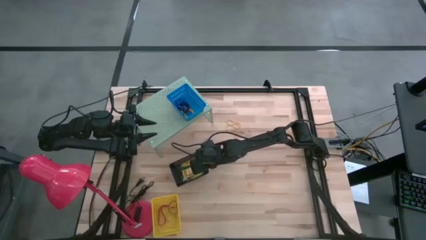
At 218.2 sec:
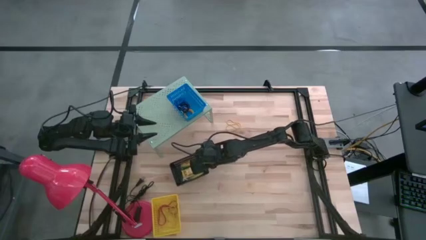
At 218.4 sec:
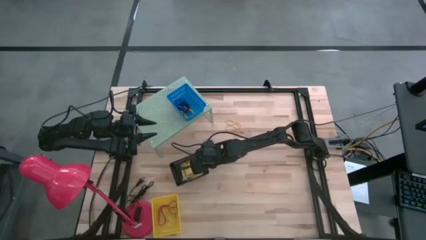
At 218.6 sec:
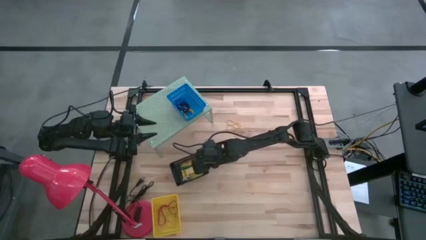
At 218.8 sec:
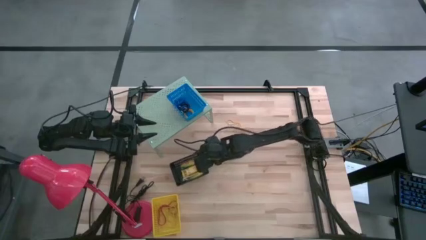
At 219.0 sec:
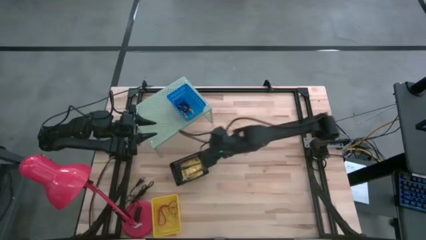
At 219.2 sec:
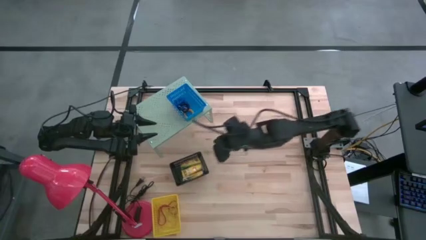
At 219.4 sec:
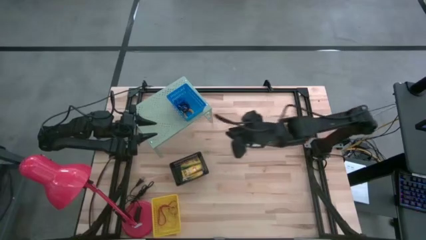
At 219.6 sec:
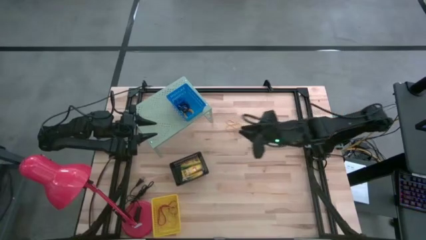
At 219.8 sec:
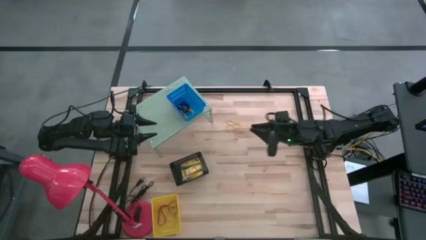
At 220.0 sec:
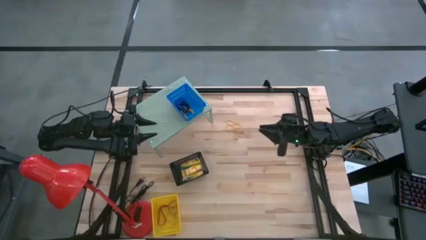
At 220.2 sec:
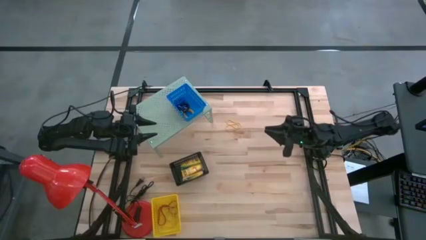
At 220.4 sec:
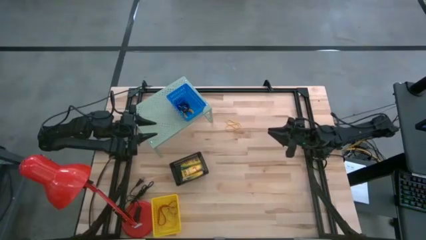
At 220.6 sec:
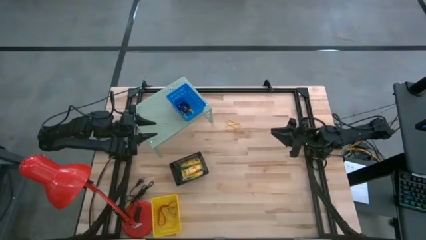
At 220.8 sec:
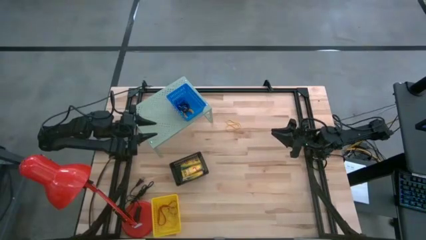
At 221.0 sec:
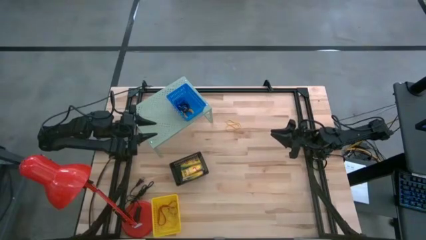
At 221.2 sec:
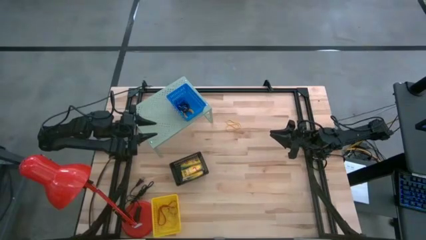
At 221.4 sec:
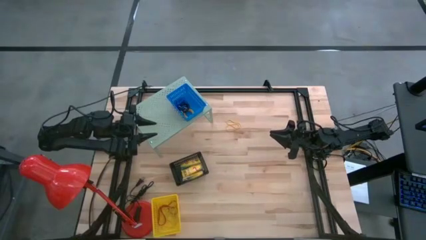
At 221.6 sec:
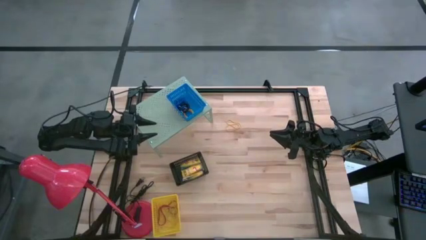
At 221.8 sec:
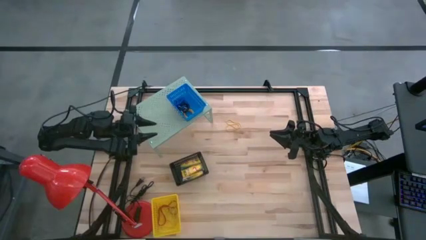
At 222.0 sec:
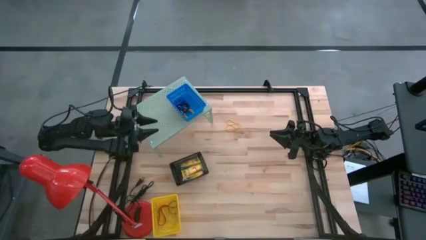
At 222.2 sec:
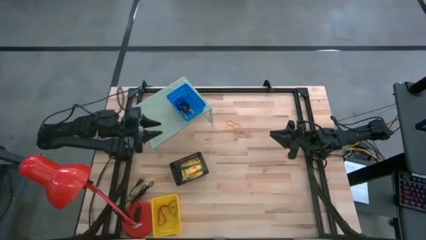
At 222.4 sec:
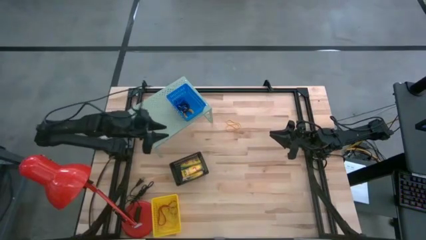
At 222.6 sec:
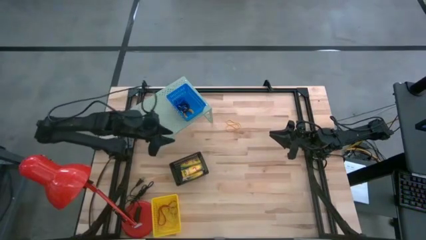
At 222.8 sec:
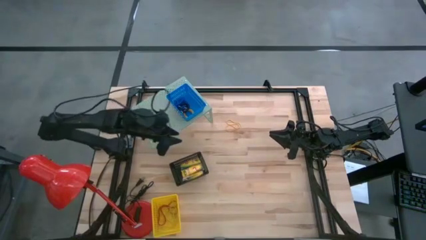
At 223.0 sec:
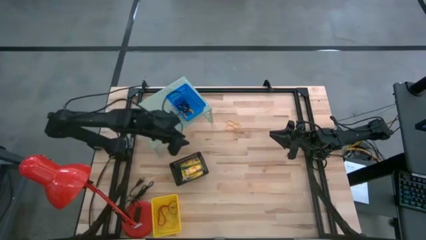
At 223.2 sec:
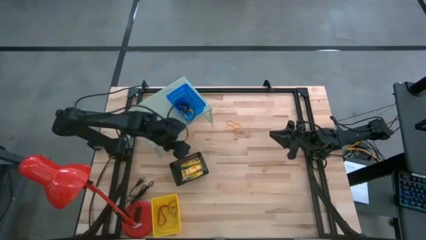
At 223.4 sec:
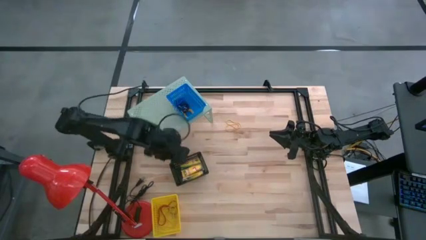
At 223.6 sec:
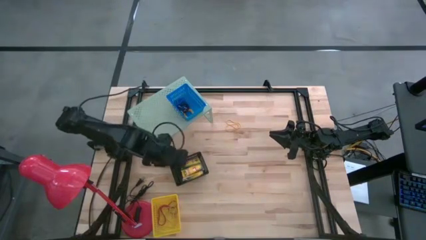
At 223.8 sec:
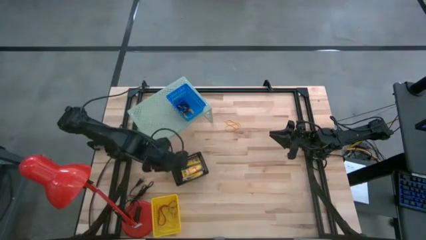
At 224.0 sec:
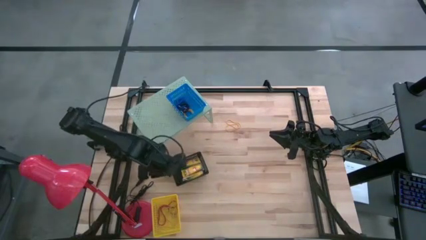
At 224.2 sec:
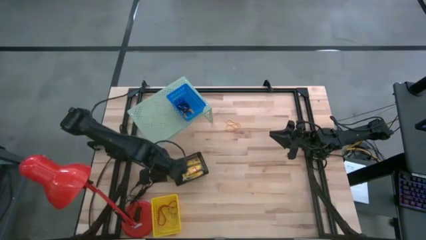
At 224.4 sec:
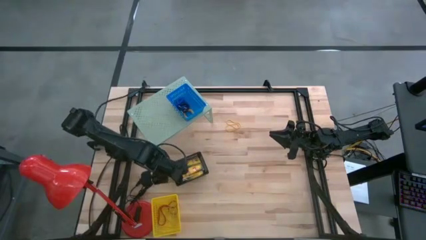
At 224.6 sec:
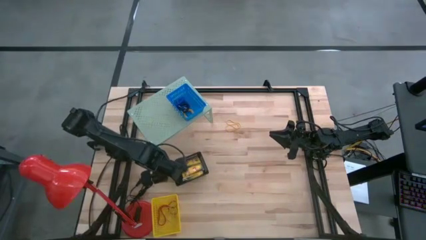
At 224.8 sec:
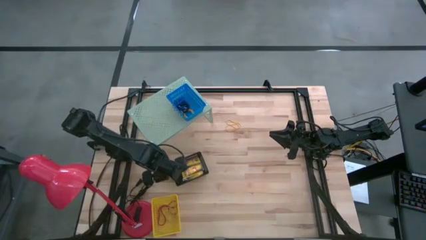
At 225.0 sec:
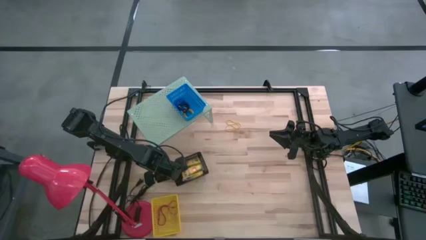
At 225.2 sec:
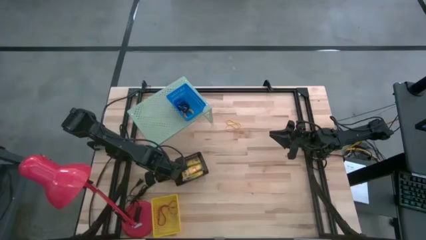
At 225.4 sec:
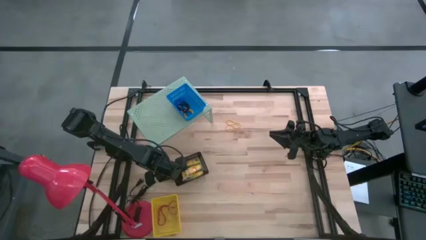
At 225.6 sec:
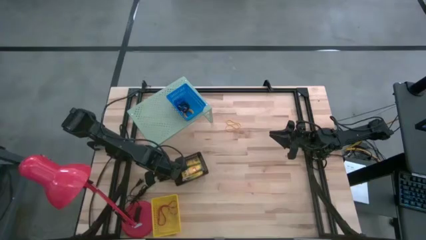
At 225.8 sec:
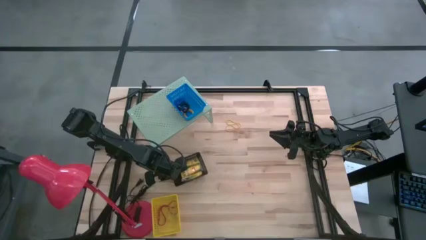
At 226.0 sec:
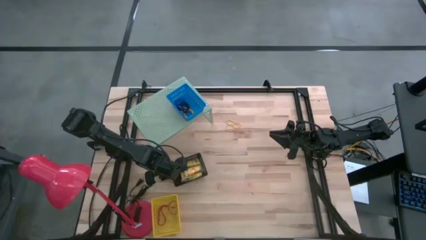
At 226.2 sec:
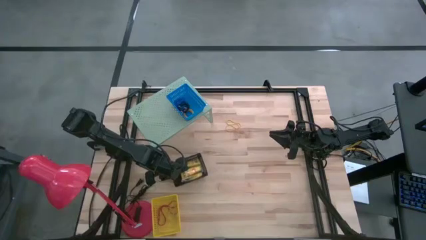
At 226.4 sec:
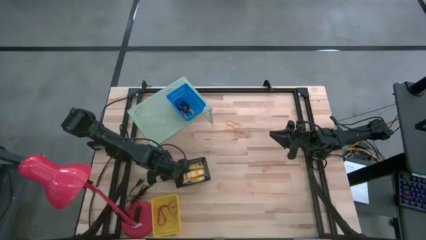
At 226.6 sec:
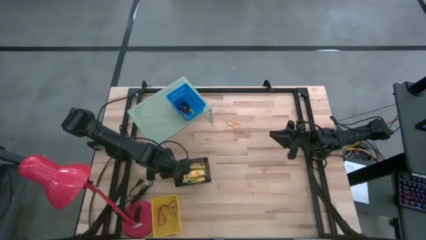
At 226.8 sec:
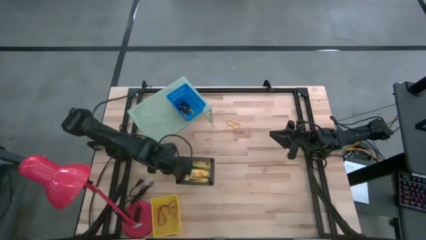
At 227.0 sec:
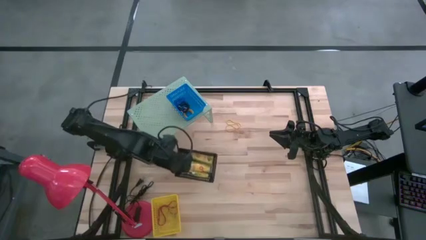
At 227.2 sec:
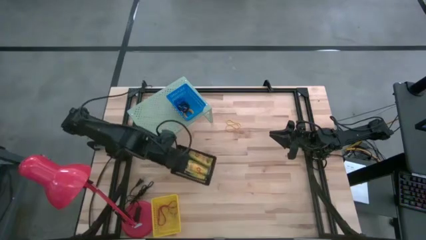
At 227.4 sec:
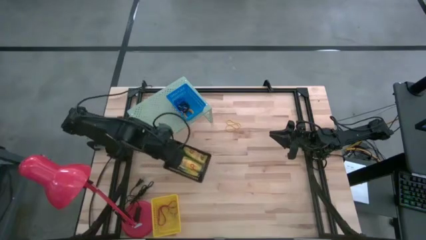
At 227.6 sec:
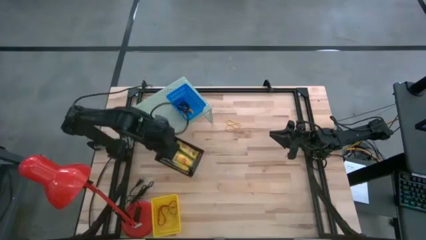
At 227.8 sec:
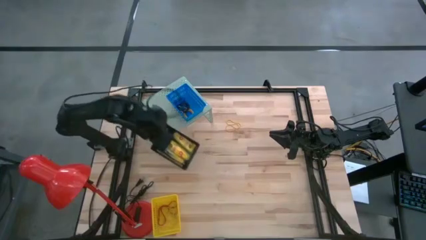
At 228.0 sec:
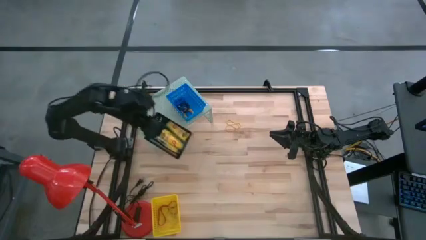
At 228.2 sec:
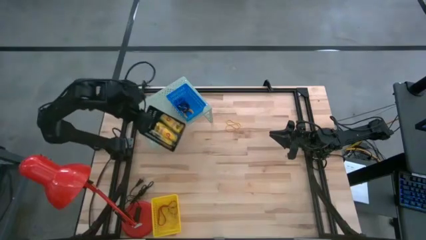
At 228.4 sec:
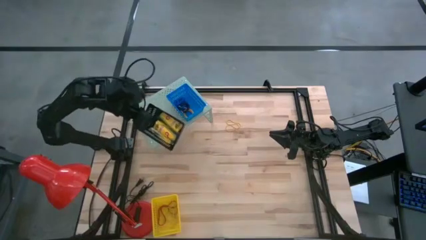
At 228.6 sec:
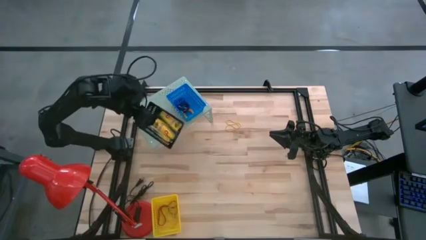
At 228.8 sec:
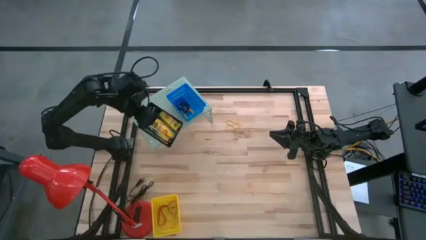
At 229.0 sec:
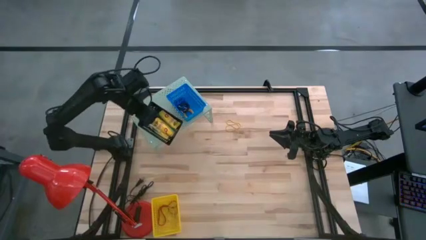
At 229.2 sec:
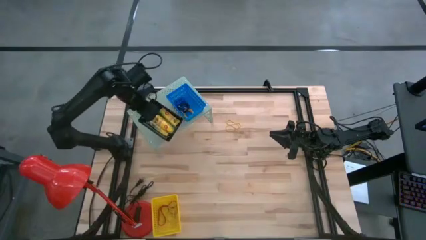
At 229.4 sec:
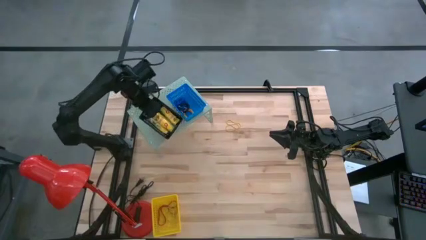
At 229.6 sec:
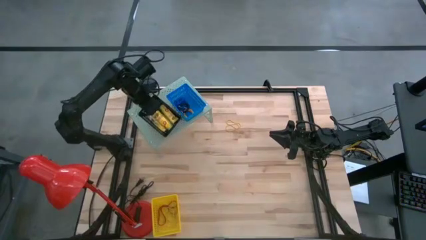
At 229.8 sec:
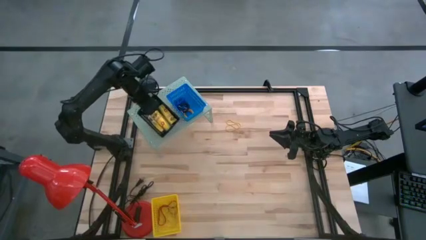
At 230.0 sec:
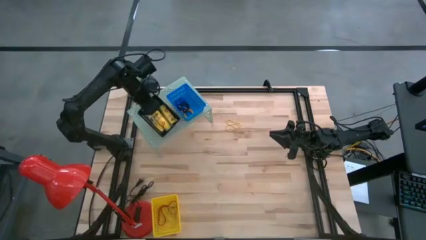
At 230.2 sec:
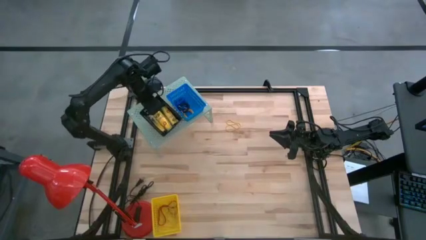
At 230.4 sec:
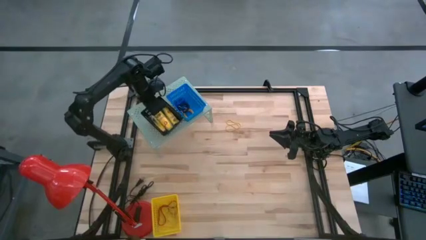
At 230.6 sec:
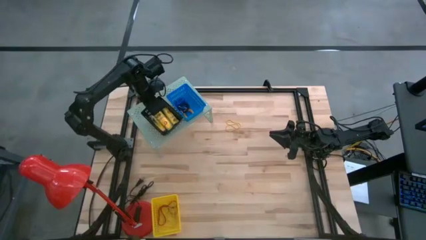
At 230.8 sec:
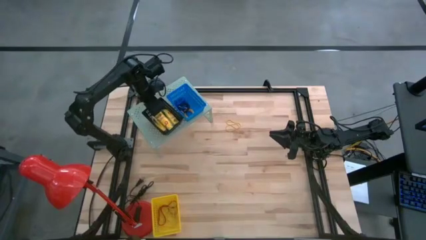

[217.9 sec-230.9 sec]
Task: Pick & Place Office Desk Supplies
Put the black basket on the shelf

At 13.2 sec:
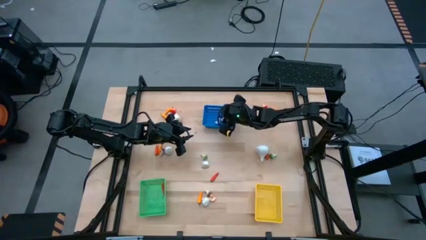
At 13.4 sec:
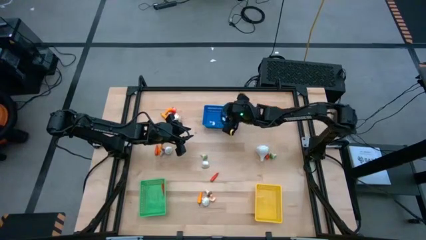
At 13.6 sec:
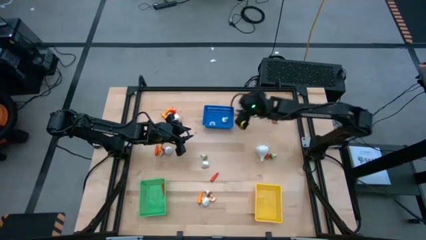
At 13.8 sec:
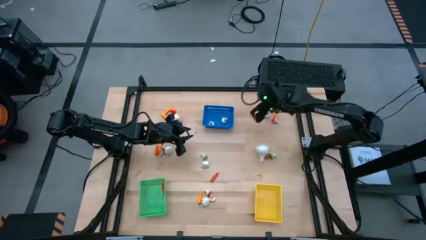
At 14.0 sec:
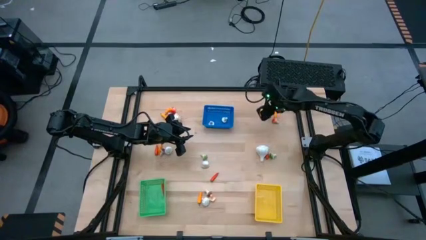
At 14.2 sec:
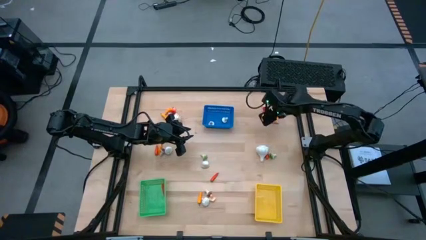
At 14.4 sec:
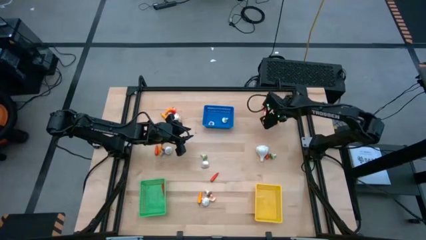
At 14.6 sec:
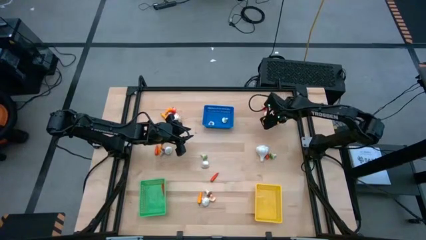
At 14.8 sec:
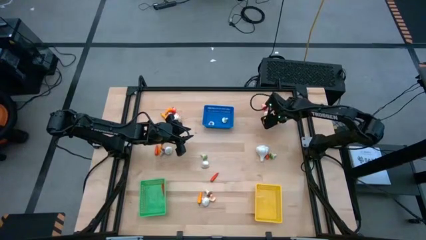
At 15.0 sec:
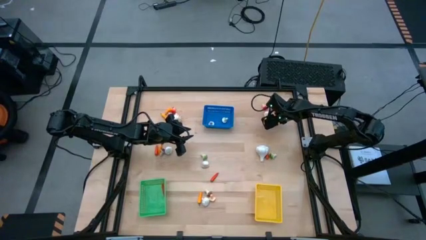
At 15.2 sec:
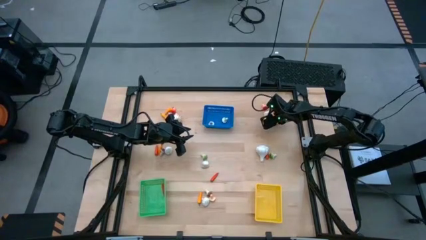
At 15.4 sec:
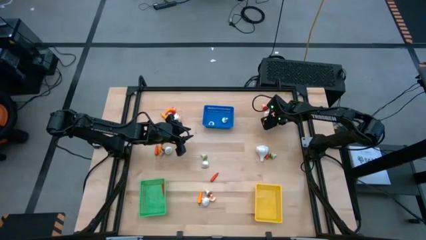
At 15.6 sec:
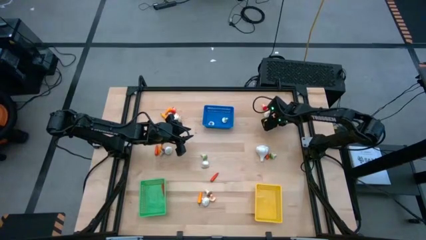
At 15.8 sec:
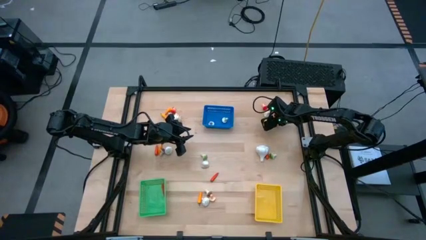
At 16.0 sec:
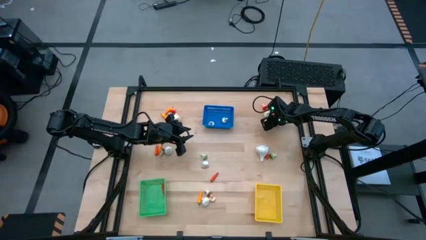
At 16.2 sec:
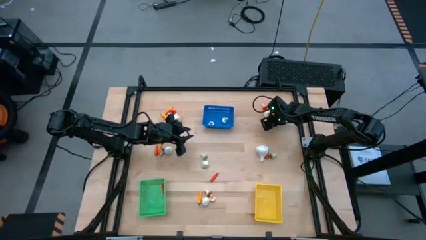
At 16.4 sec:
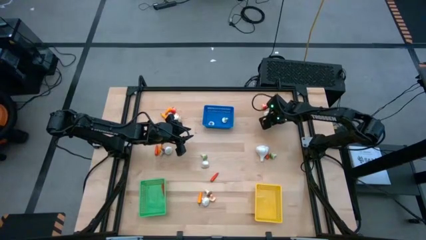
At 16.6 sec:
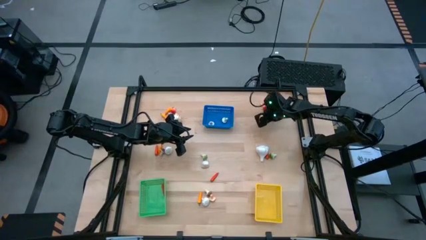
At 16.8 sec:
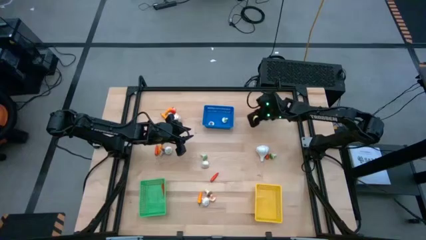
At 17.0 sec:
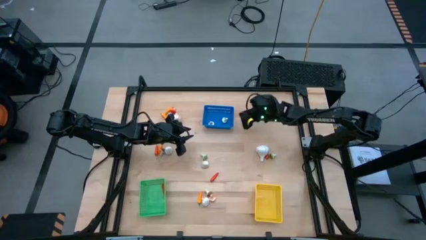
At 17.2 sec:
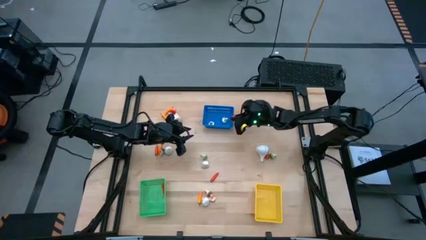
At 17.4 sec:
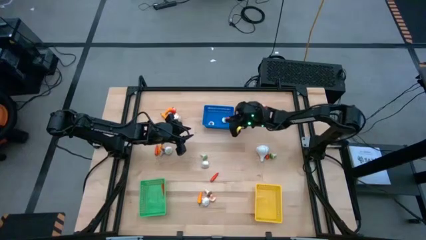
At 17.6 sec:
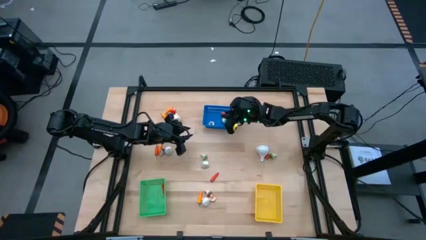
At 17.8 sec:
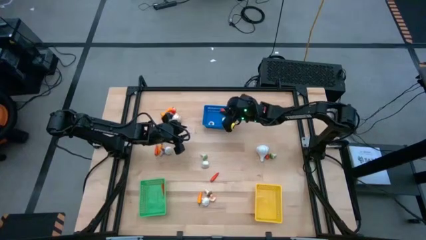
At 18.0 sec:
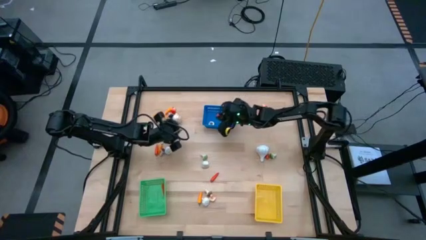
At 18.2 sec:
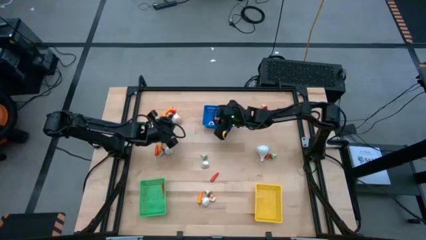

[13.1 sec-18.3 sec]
Task: Sort produce into baskets
Put the red mushroom into the blue bin
